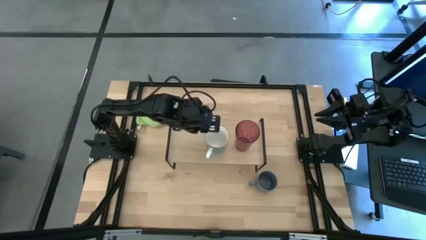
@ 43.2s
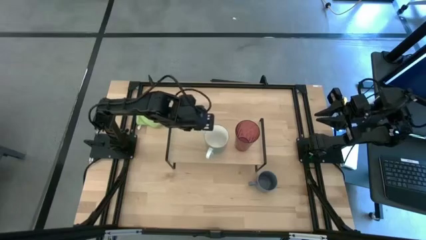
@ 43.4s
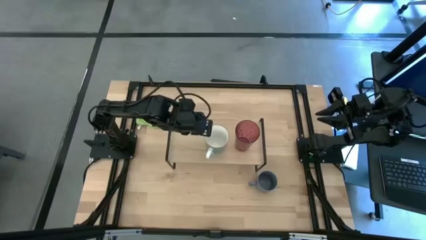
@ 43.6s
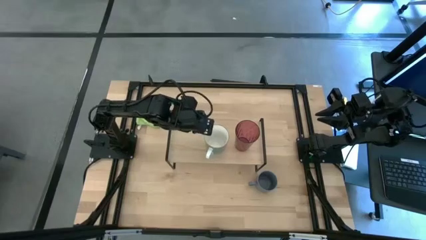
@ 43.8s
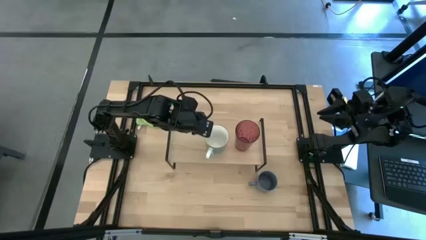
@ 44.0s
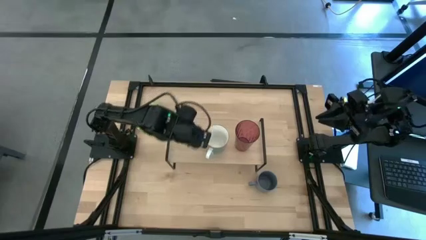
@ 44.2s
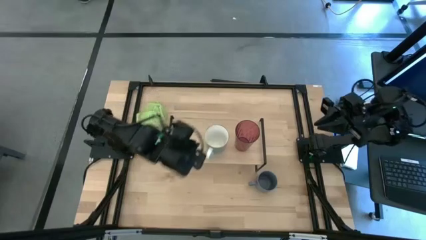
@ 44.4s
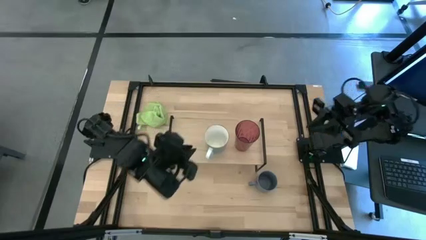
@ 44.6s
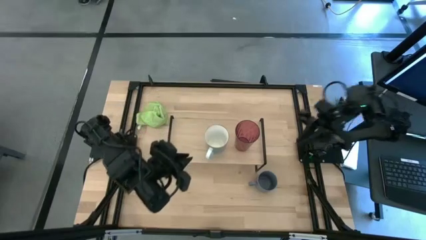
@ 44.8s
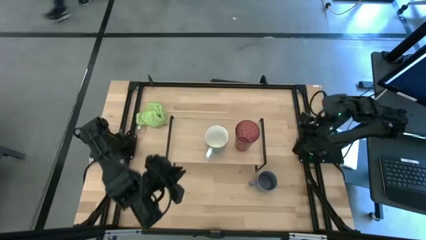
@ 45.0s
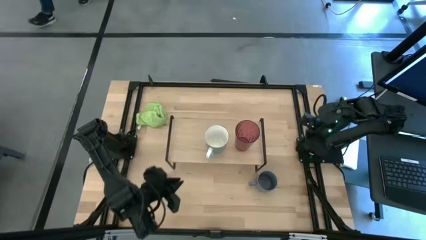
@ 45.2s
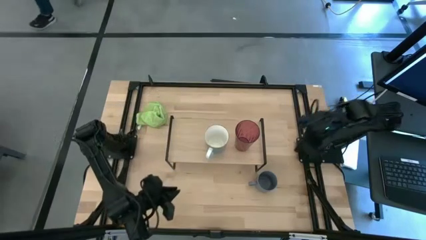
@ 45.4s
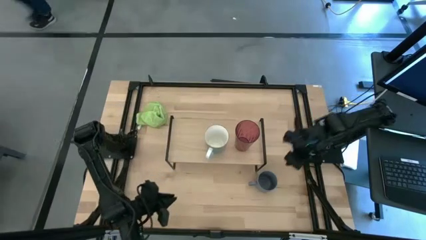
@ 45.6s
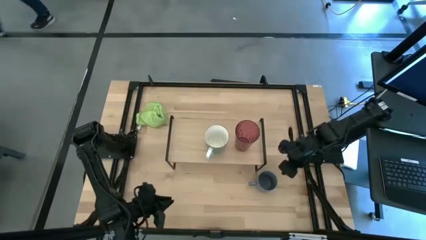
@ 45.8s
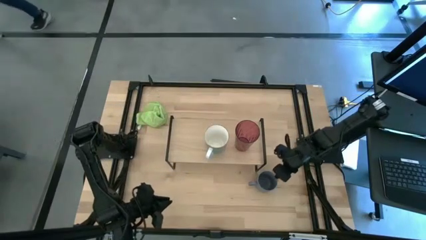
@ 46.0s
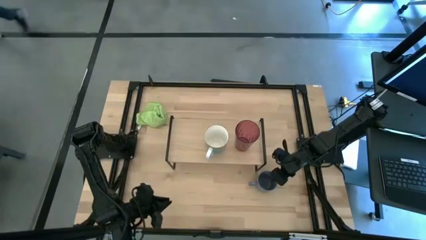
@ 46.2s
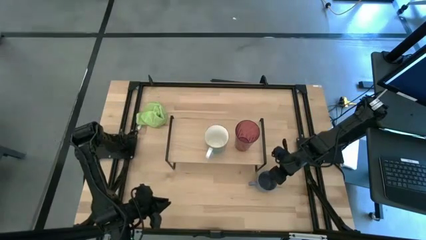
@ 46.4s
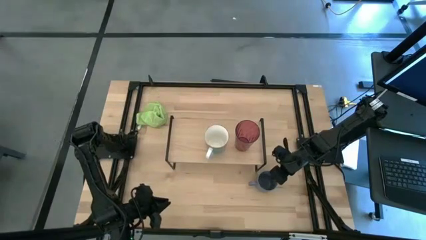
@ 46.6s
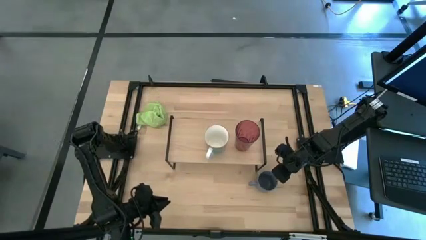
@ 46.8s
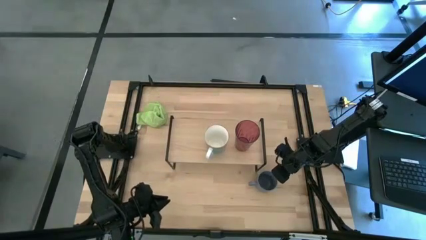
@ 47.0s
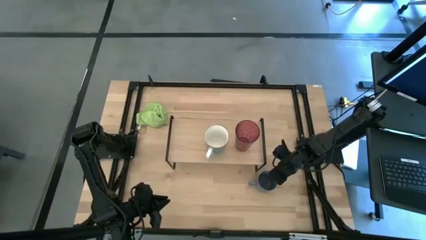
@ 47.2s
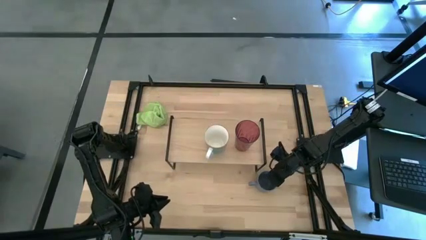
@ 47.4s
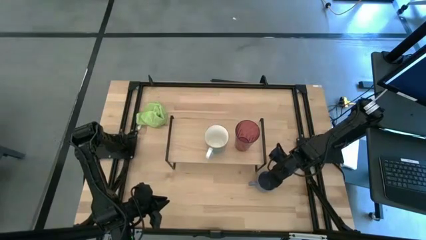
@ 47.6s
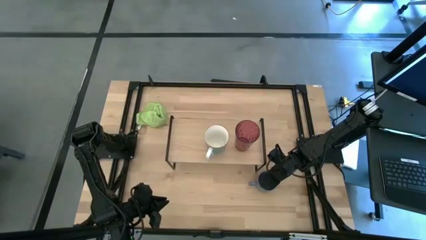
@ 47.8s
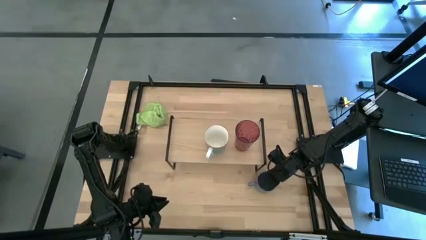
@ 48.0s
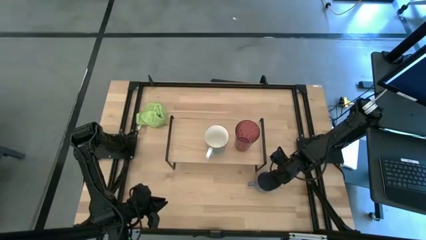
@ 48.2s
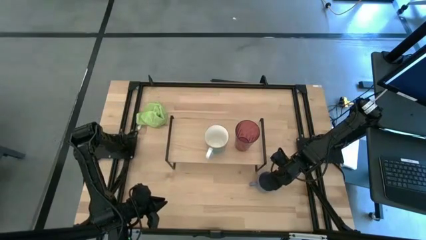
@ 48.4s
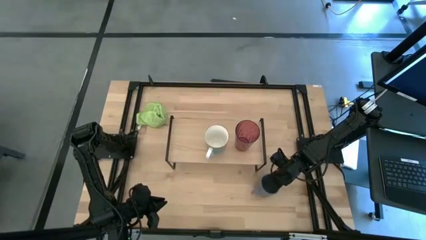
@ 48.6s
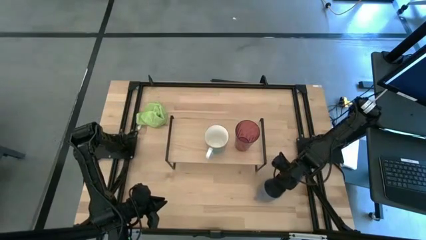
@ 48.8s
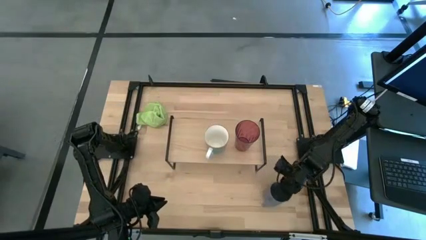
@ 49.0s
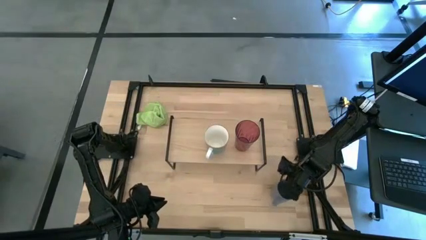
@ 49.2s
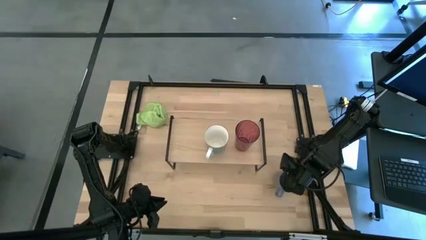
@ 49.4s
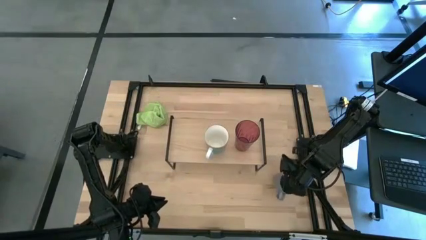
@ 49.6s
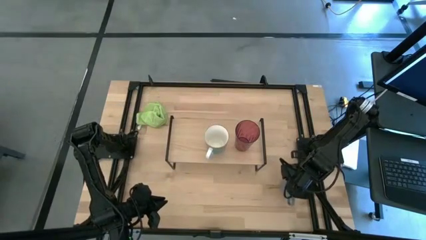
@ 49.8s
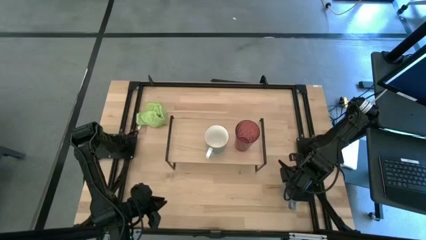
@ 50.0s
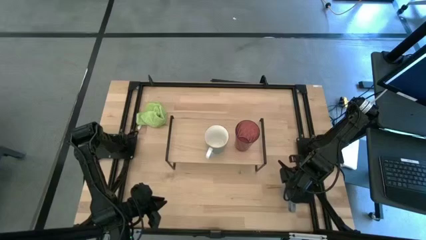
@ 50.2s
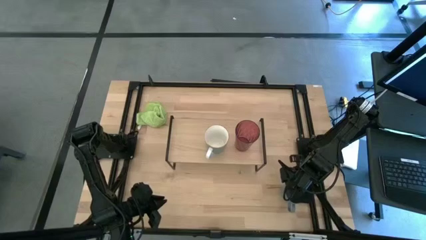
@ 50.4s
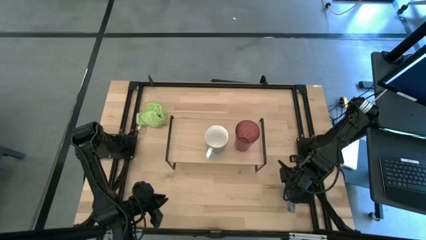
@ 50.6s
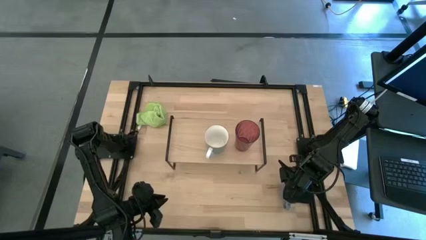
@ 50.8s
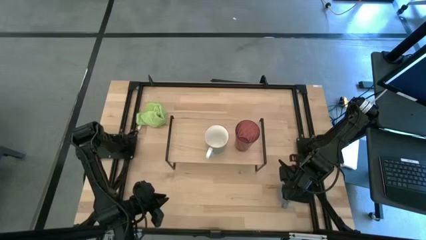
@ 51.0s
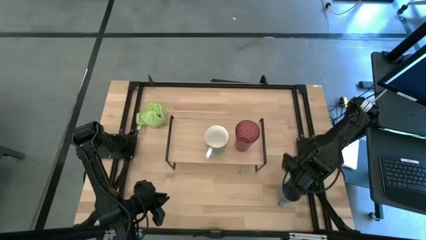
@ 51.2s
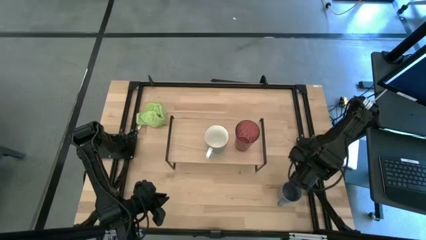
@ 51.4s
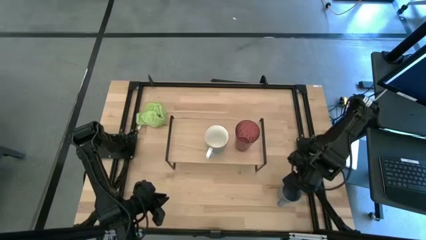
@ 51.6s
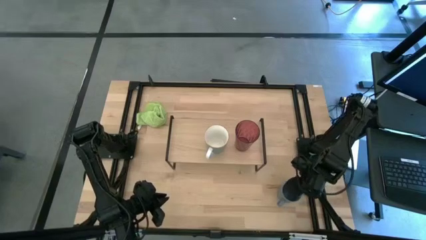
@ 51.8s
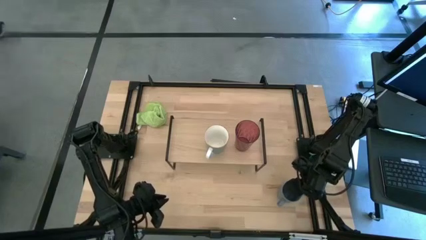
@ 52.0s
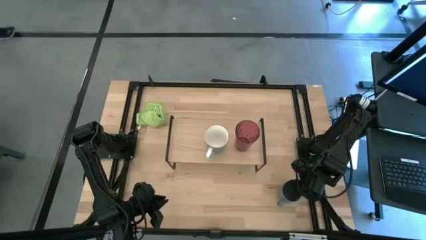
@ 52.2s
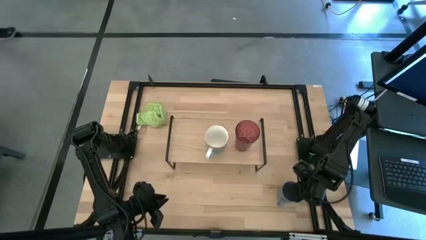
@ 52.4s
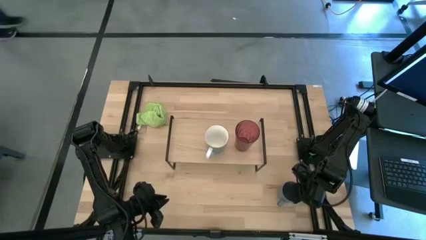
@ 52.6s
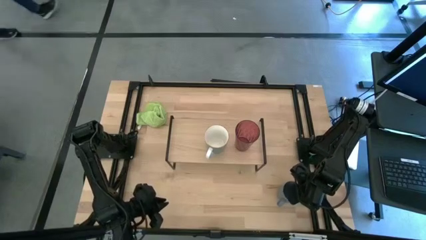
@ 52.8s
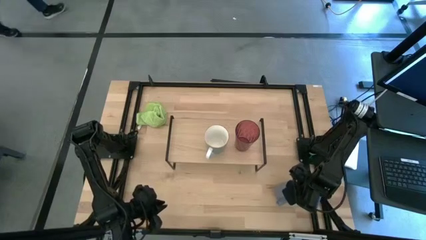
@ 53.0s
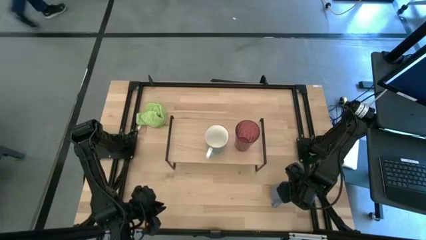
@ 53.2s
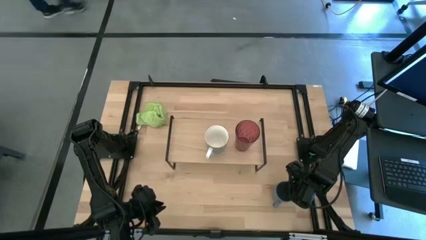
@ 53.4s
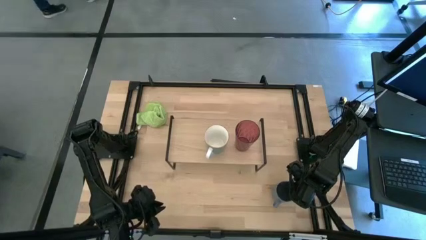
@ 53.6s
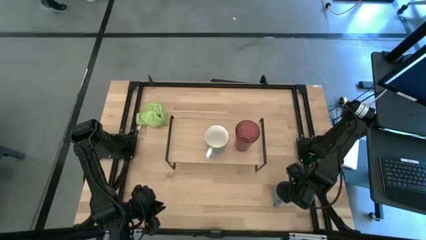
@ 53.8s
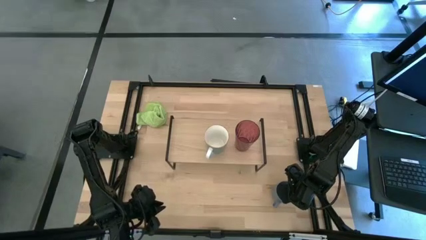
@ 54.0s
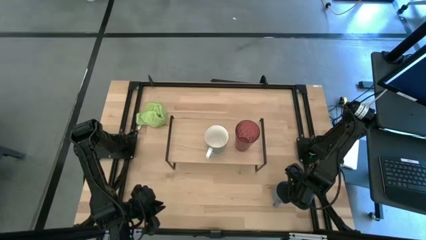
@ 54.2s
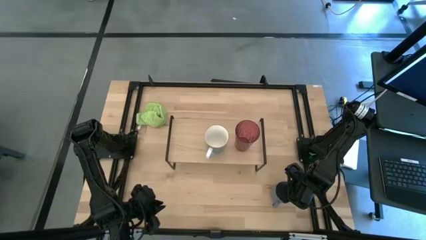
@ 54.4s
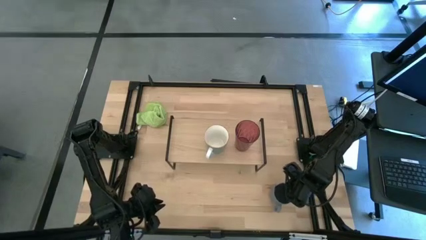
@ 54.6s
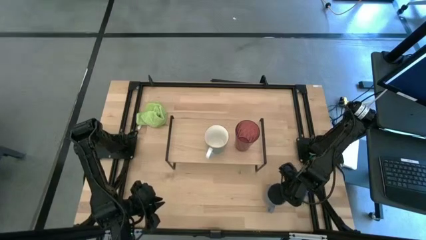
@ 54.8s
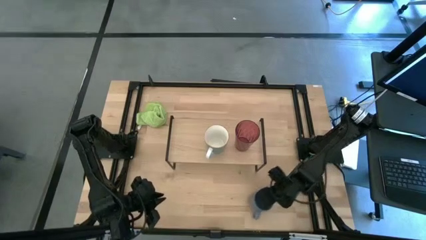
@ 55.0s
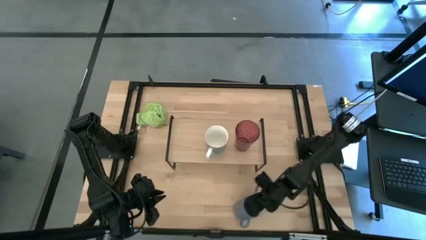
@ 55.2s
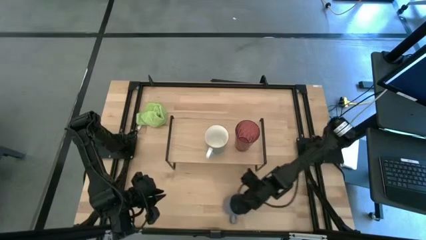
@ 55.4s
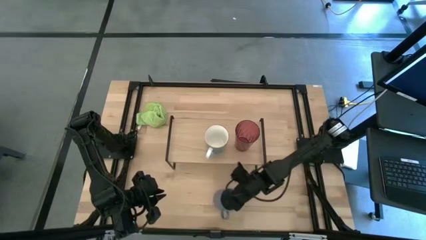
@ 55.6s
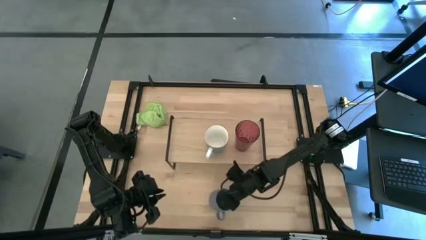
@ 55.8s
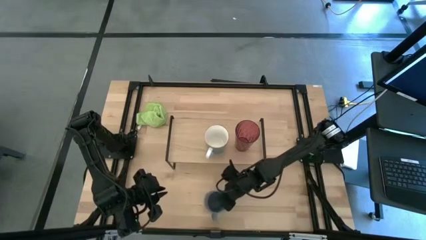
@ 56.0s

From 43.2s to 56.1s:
Task: Stack small to large cups/mugs on shelf
Put the blue mug on the shelf
